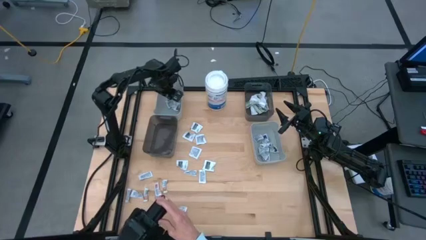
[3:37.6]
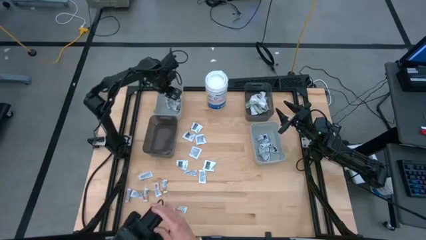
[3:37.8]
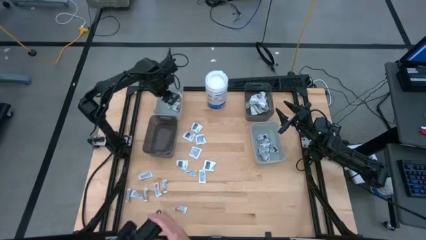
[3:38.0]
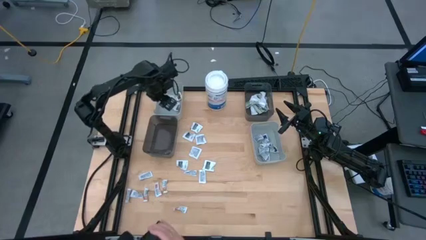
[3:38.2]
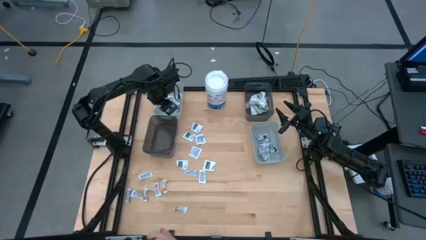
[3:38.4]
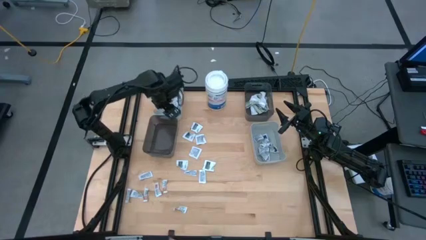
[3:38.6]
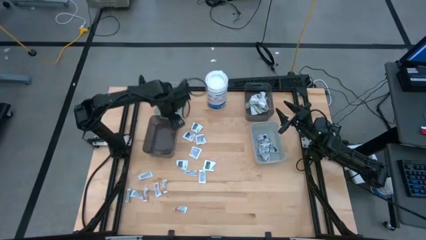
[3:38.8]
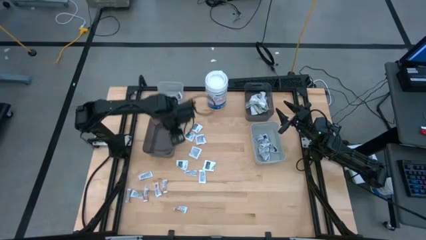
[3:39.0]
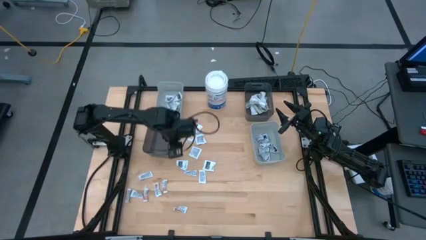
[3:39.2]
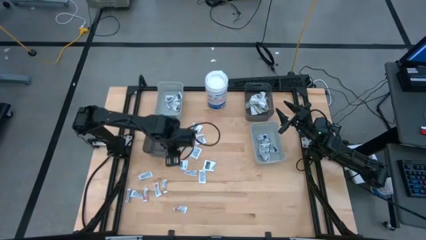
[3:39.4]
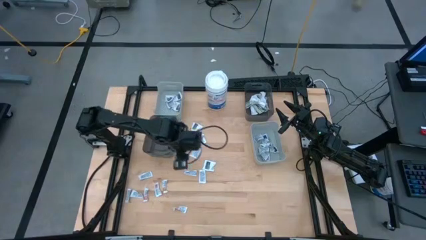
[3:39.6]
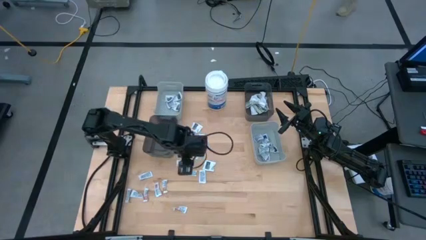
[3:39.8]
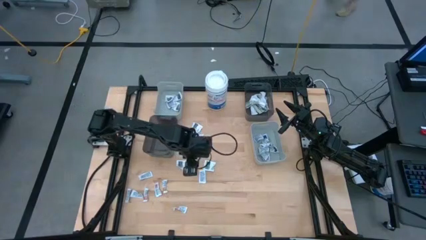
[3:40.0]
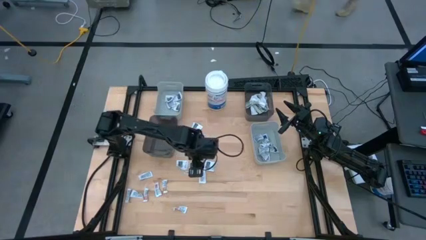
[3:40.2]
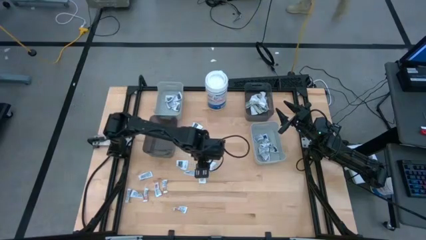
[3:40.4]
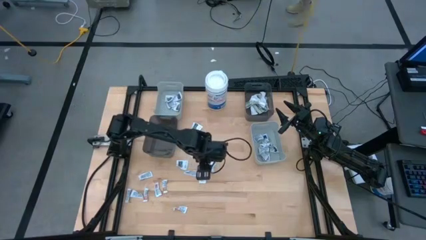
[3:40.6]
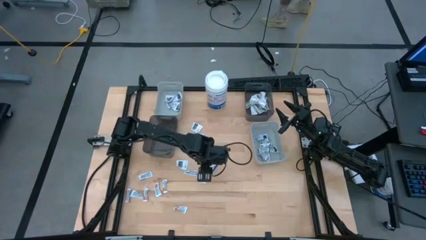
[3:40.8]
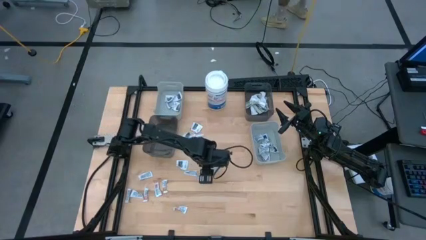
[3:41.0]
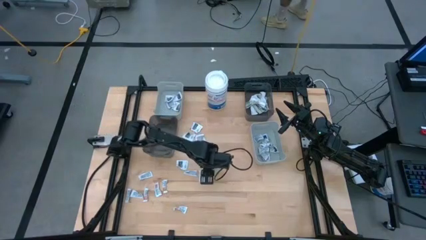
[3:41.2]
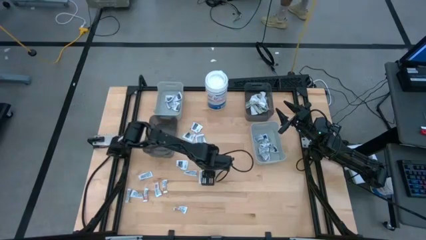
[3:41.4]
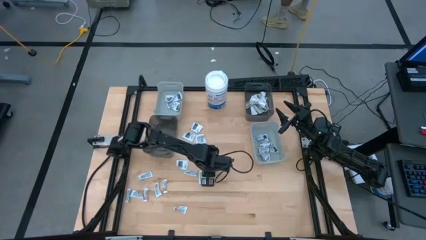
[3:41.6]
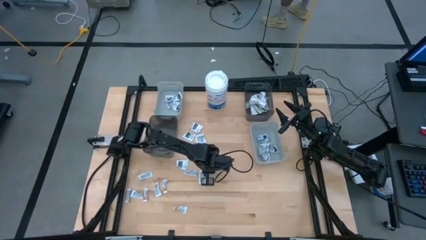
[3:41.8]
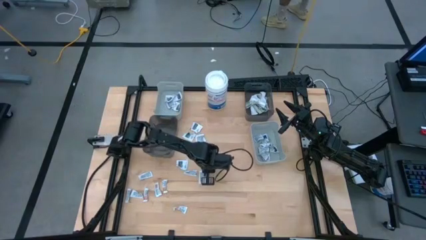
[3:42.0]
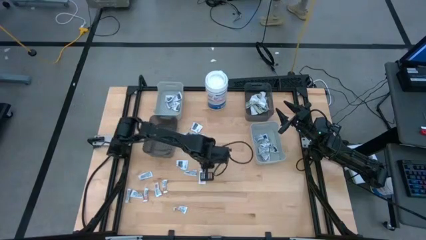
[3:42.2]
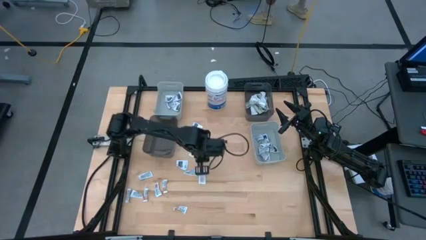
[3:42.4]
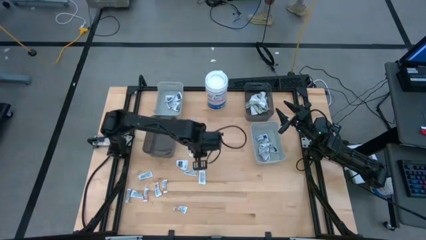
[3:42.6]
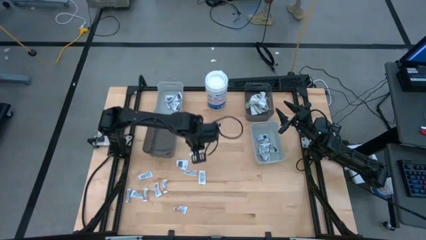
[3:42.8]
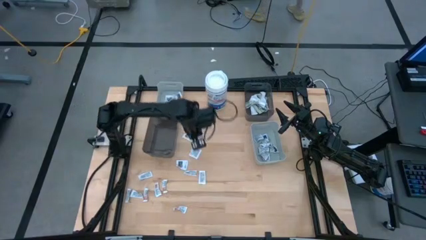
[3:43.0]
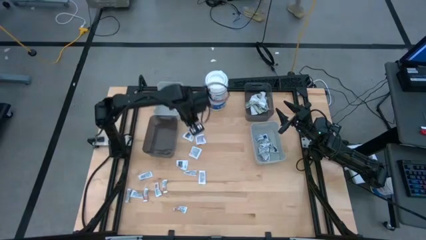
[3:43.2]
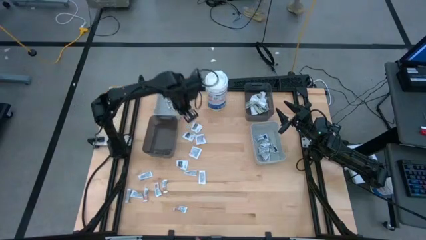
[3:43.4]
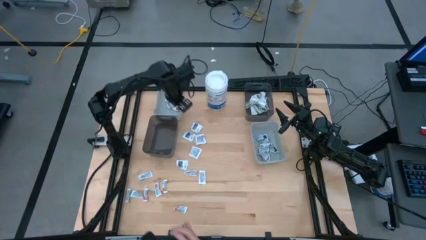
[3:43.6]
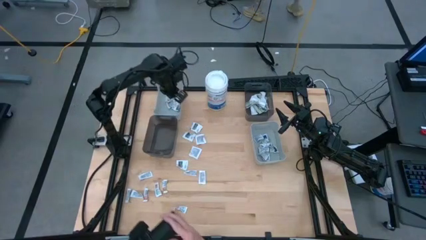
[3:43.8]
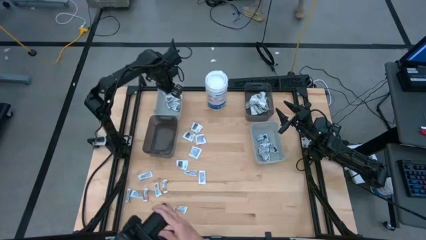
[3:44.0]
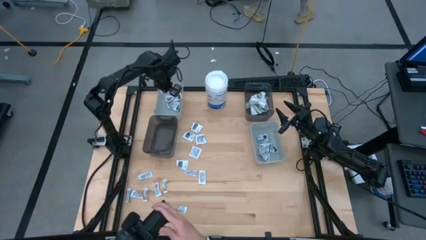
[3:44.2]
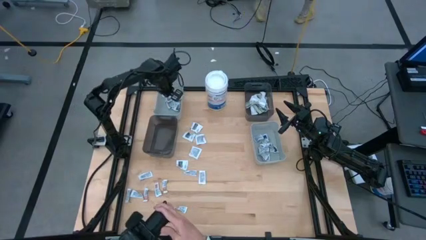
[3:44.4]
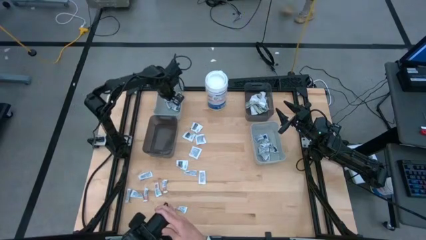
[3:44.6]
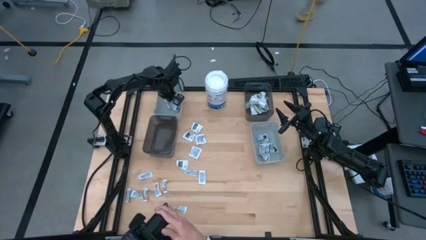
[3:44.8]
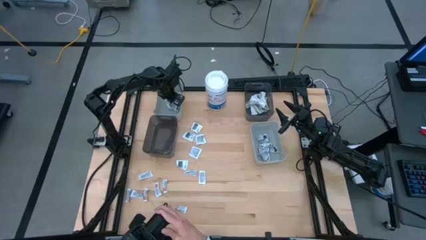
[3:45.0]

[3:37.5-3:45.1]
Task: Pick & Place First Aid Supplies
Put the gray towelette pack into the left gray bin

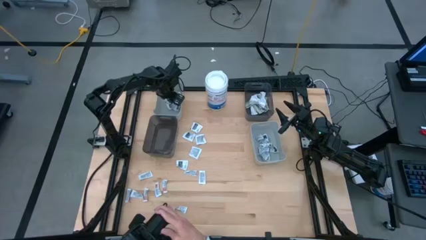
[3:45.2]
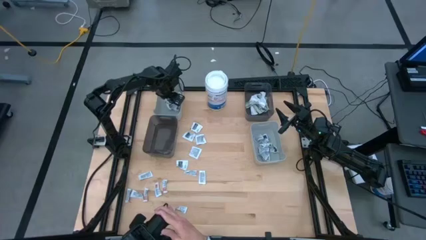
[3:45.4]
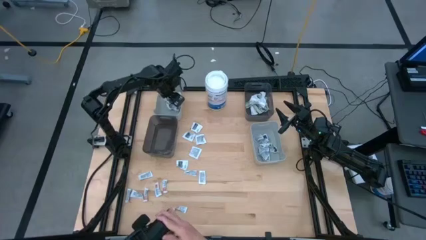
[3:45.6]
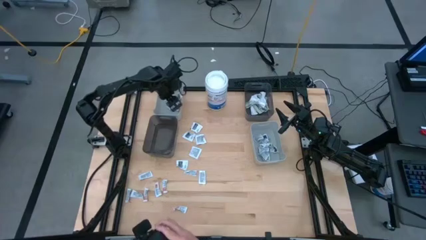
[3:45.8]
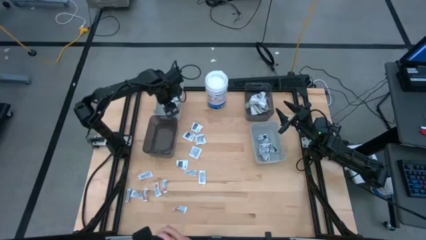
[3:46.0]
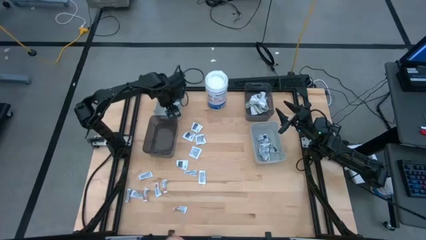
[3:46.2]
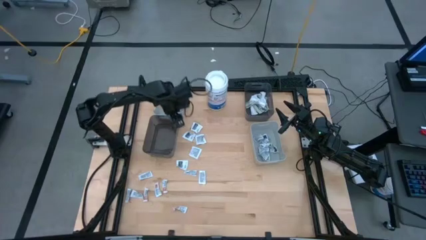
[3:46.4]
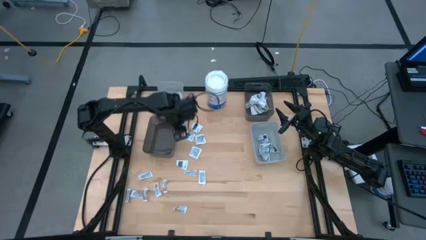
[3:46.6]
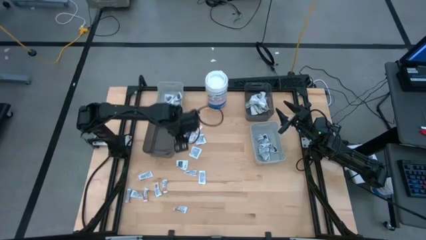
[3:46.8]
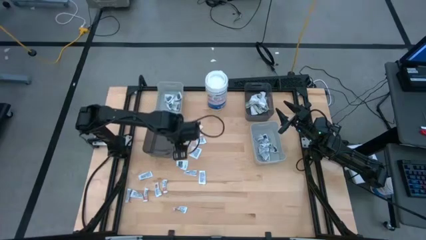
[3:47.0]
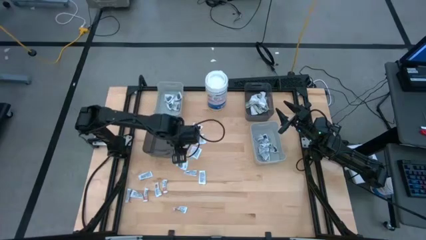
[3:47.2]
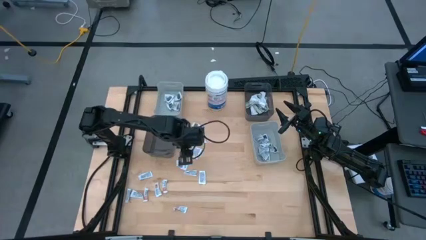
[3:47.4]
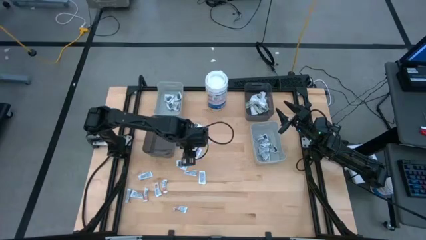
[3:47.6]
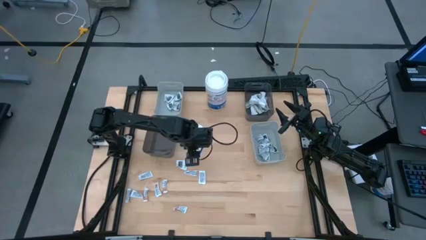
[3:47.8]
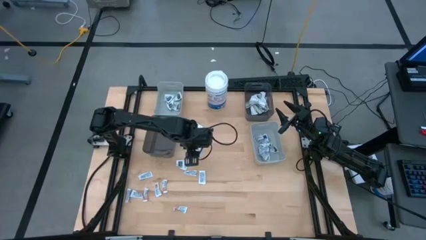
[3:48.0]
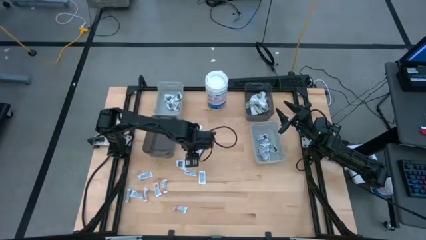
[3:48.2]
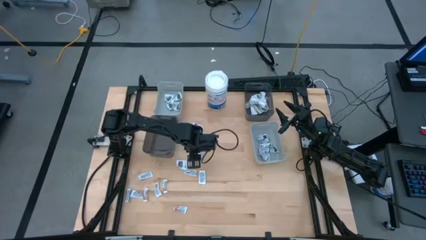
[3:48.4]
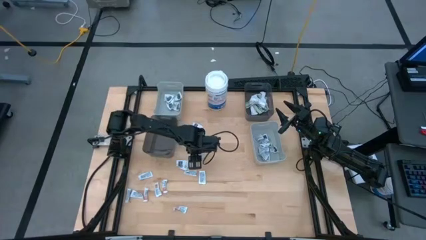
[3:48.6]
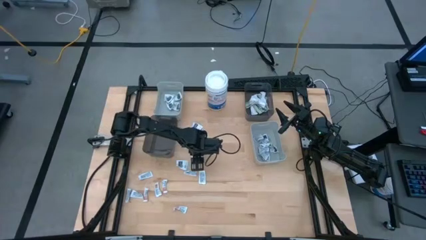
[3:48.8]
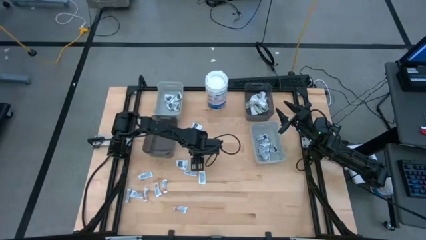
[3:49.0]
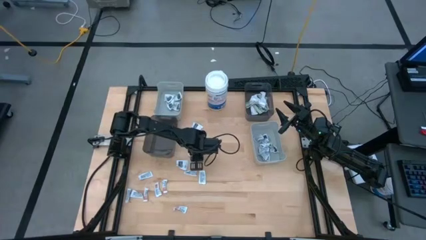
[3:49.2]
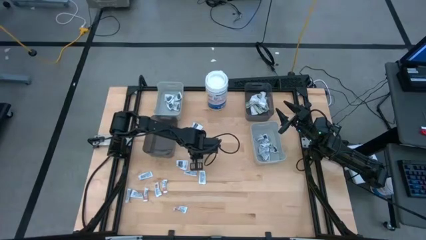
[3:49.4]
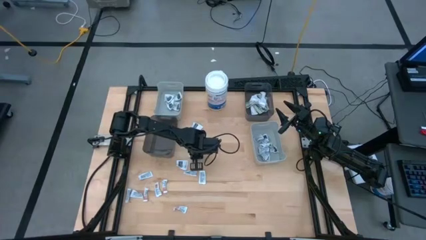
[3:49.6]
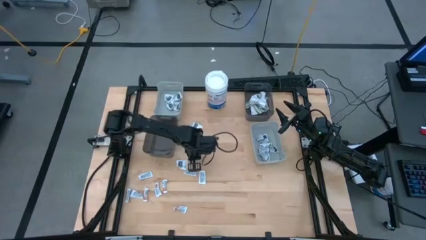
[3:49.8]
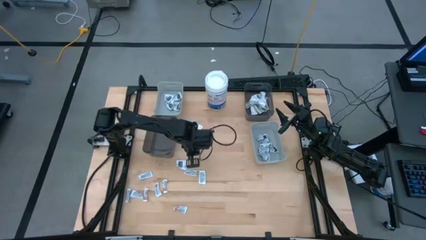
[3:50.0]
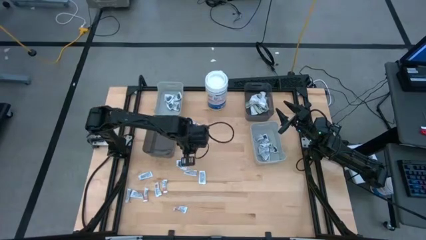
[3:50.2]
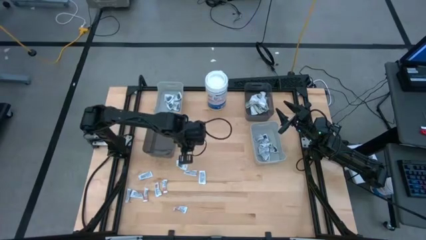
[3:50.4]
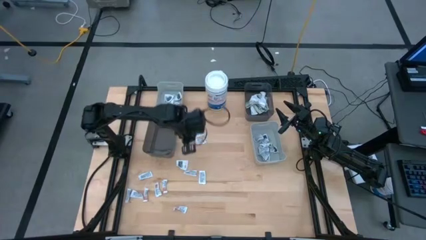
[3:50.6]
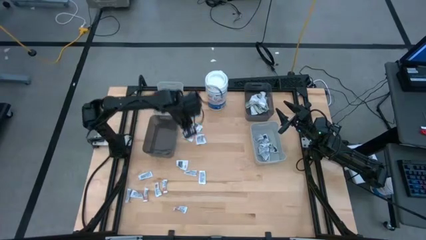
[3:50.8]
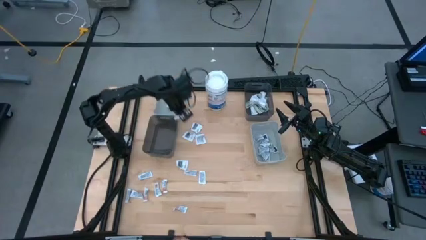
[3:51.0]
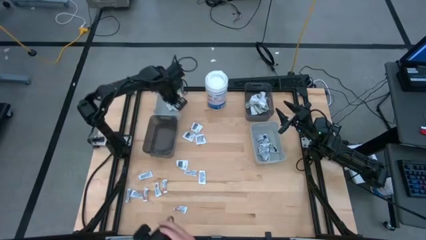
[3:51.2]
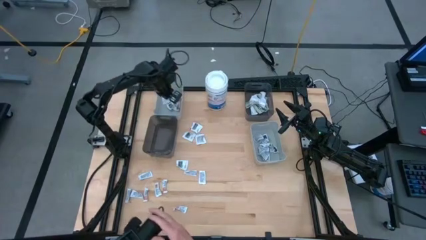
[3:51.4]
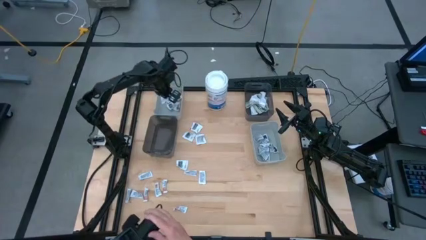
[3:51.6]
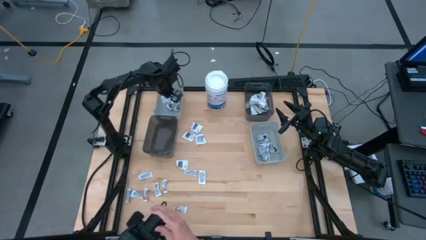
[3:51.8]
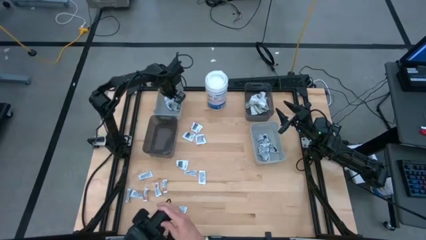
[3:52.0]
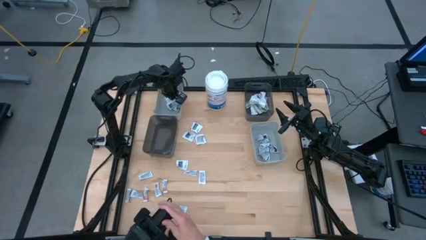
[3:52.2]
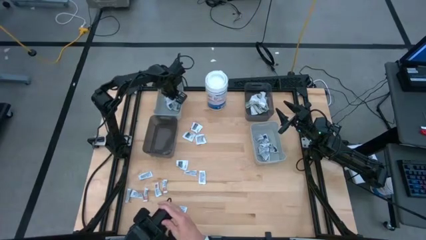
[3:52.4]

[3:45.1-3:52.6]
Put the gray towelette pack into the left gray bin
